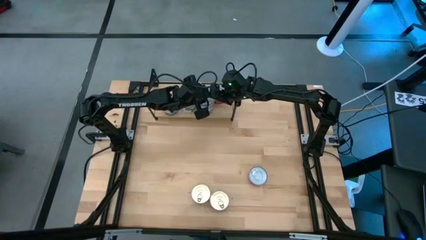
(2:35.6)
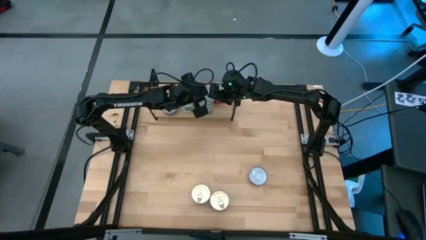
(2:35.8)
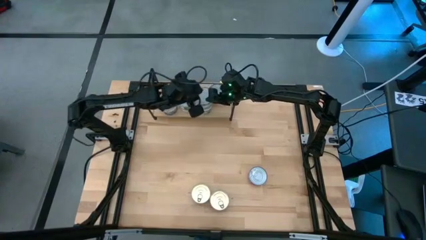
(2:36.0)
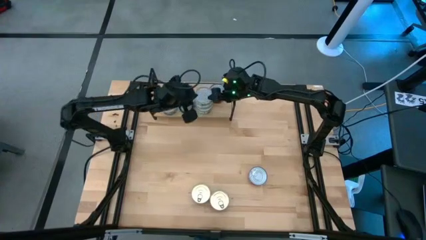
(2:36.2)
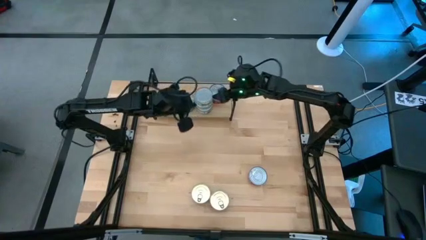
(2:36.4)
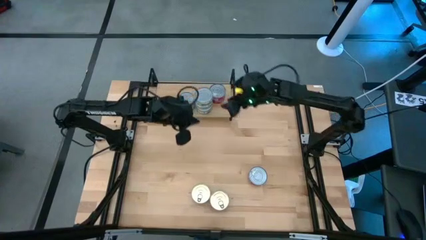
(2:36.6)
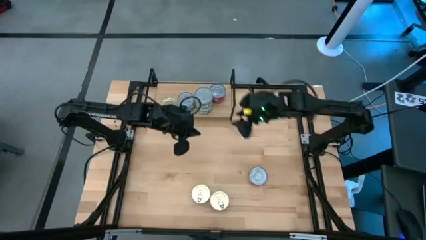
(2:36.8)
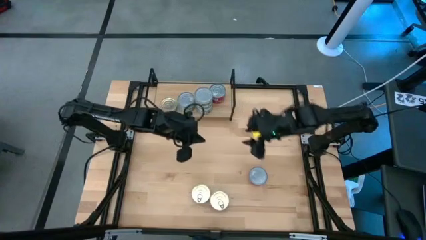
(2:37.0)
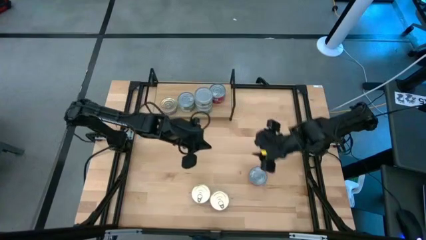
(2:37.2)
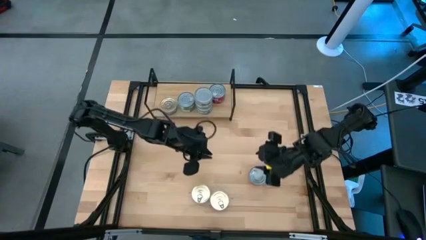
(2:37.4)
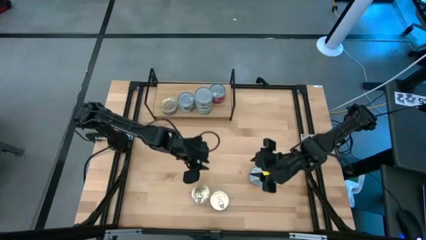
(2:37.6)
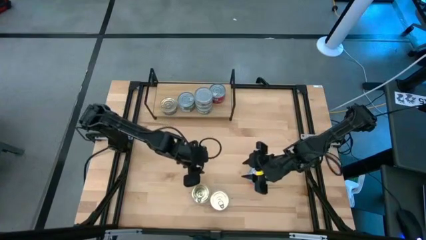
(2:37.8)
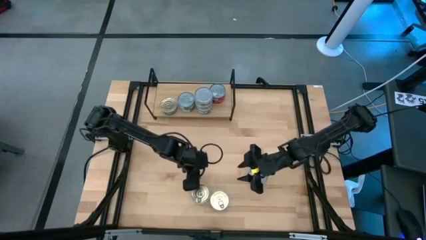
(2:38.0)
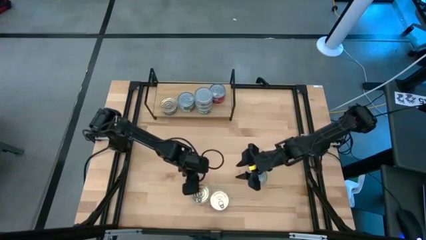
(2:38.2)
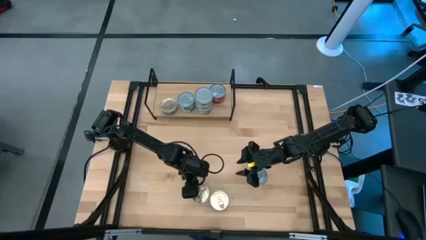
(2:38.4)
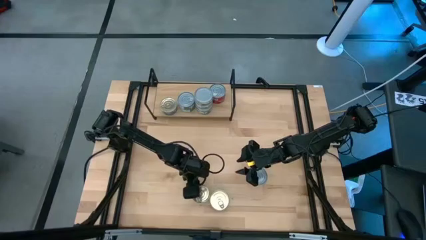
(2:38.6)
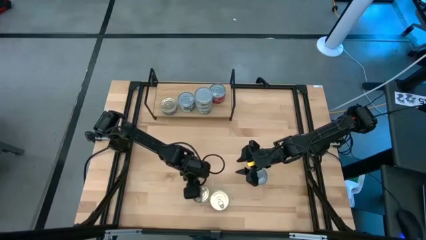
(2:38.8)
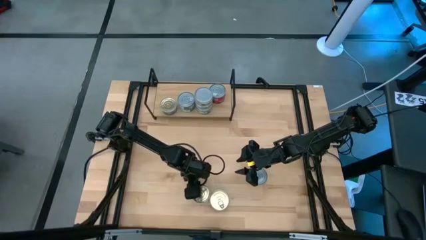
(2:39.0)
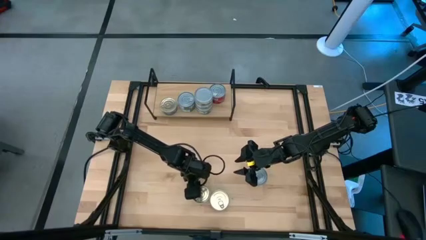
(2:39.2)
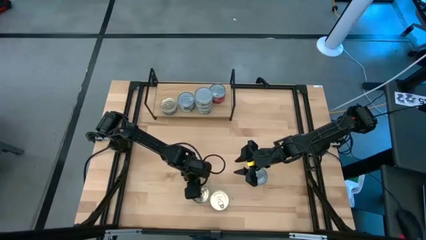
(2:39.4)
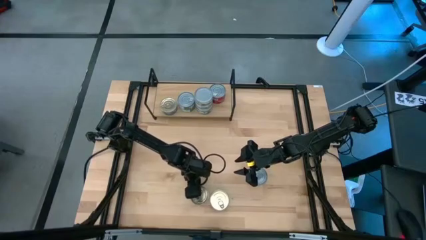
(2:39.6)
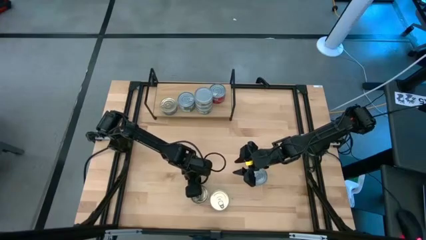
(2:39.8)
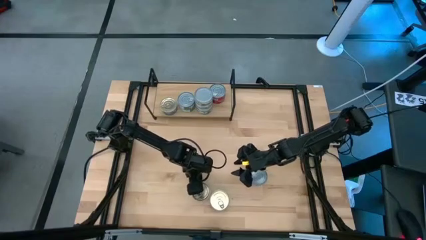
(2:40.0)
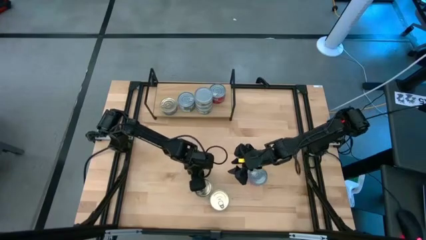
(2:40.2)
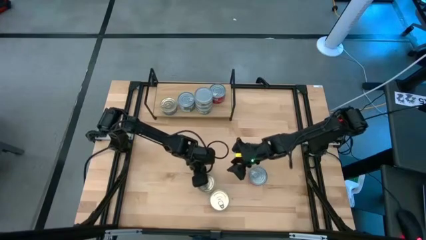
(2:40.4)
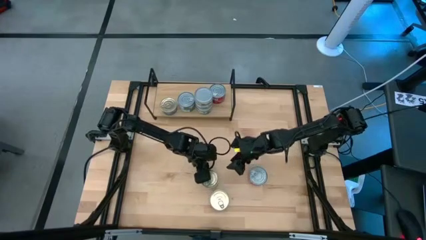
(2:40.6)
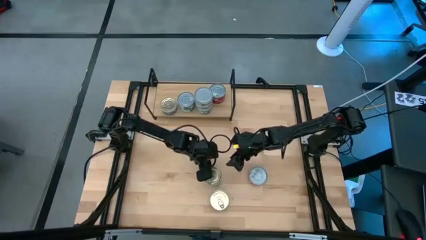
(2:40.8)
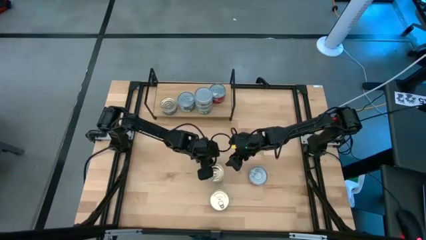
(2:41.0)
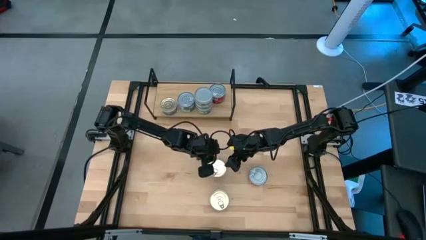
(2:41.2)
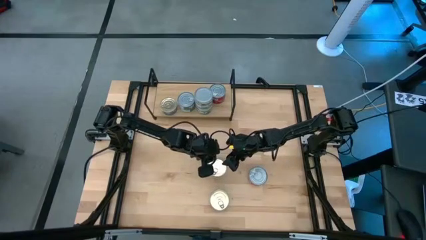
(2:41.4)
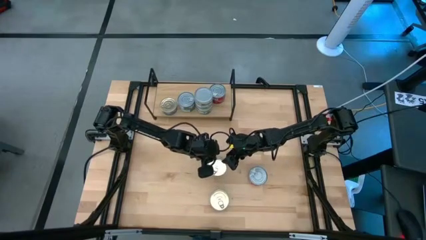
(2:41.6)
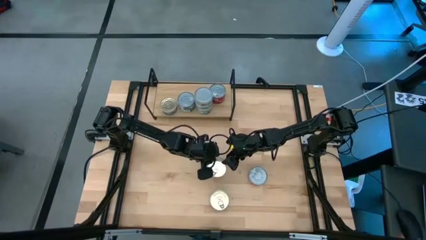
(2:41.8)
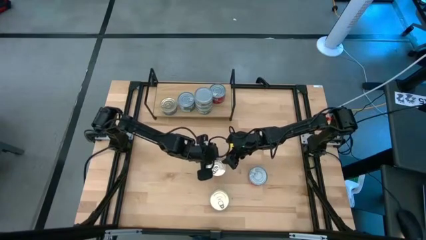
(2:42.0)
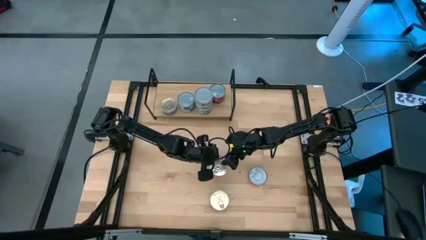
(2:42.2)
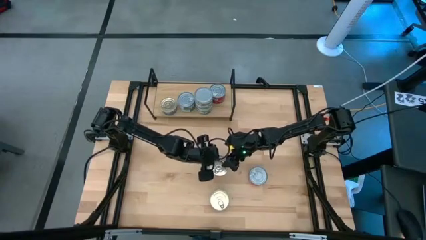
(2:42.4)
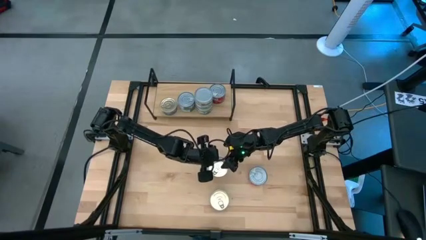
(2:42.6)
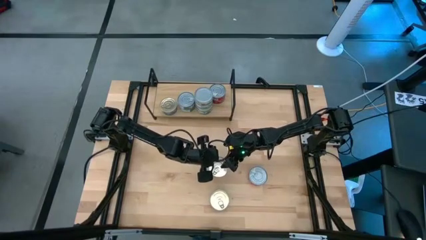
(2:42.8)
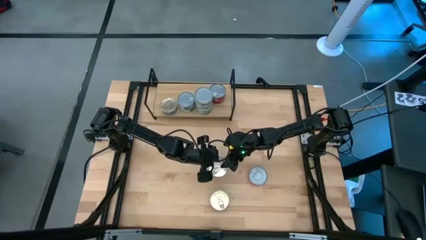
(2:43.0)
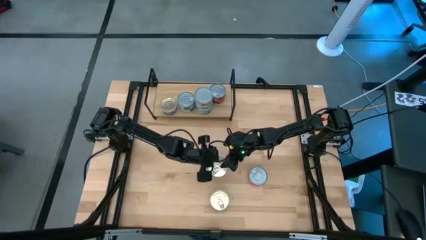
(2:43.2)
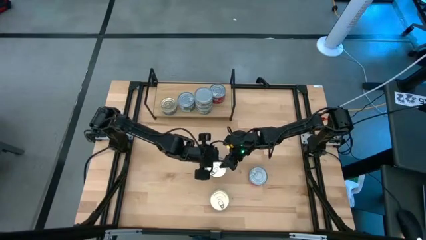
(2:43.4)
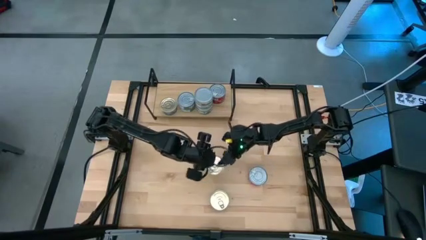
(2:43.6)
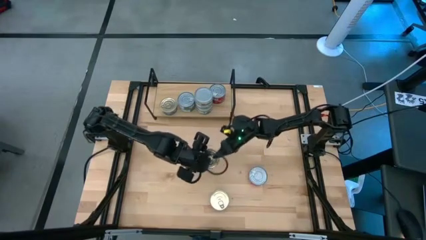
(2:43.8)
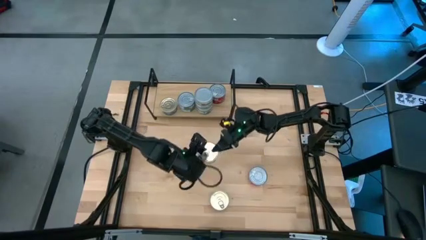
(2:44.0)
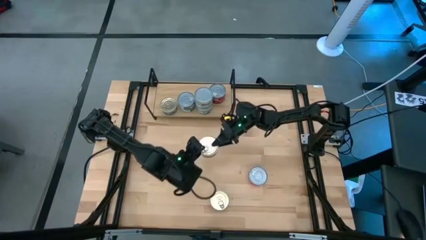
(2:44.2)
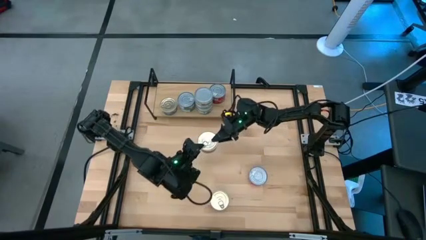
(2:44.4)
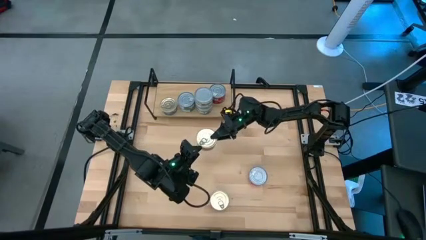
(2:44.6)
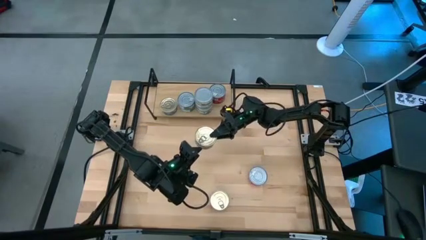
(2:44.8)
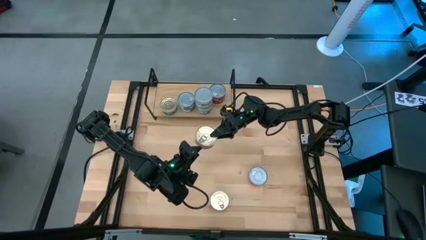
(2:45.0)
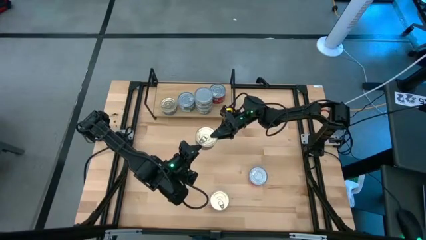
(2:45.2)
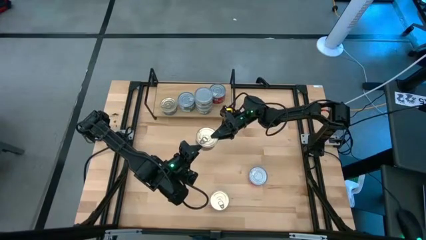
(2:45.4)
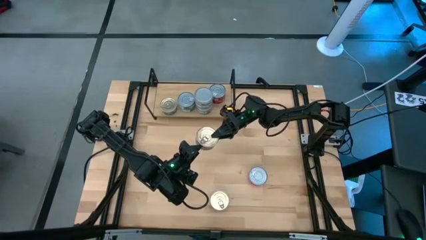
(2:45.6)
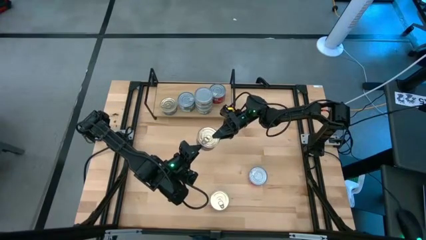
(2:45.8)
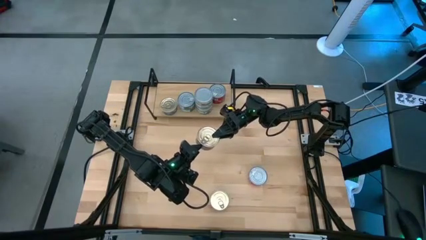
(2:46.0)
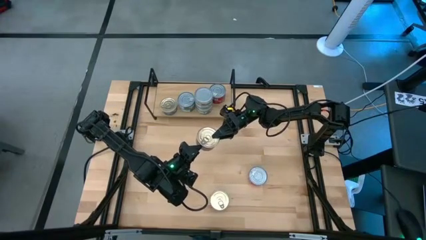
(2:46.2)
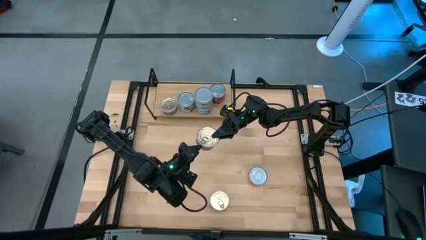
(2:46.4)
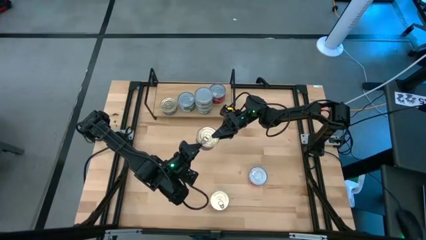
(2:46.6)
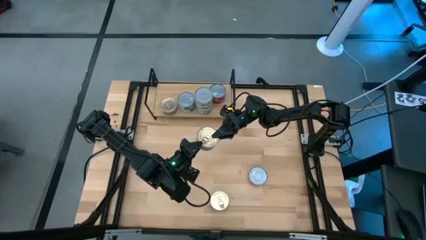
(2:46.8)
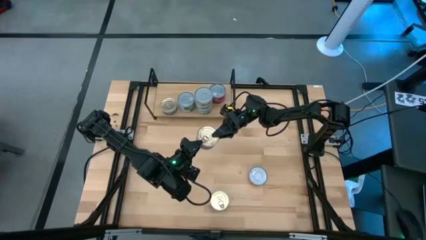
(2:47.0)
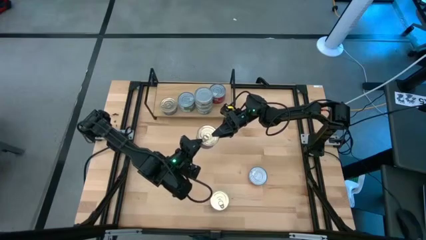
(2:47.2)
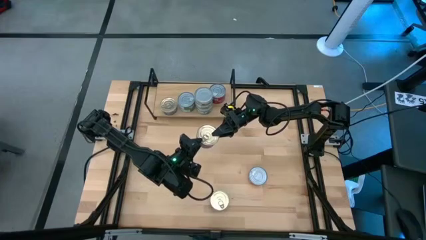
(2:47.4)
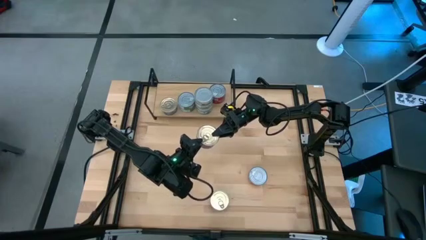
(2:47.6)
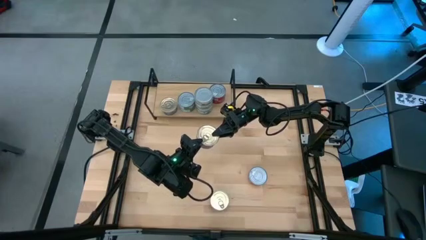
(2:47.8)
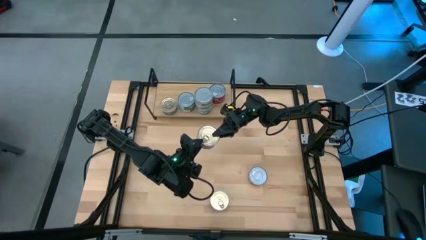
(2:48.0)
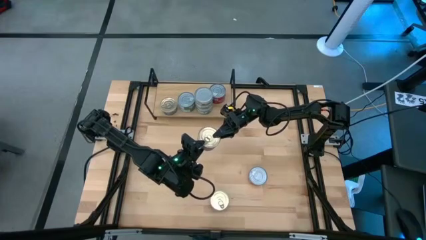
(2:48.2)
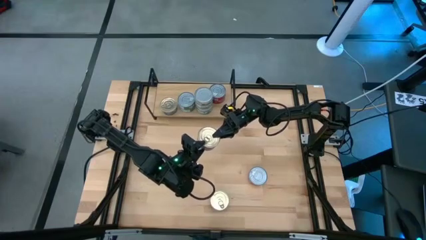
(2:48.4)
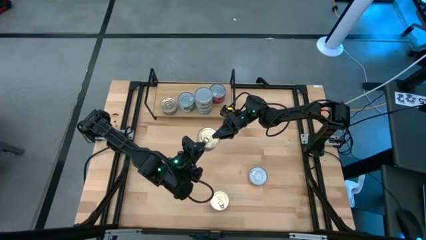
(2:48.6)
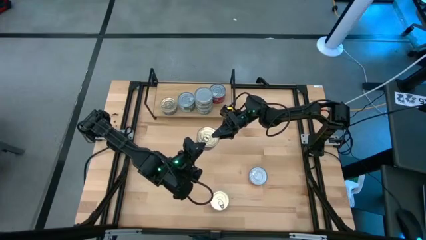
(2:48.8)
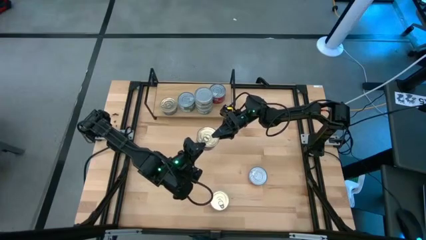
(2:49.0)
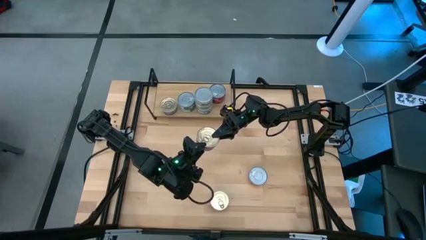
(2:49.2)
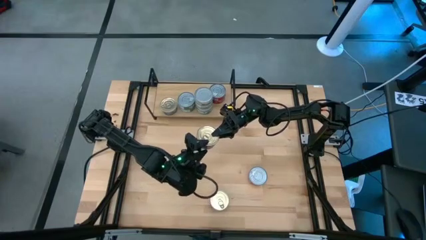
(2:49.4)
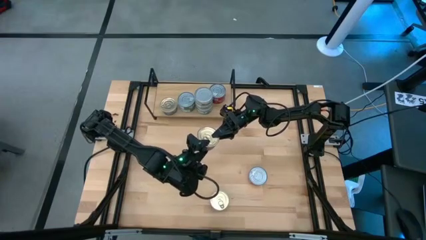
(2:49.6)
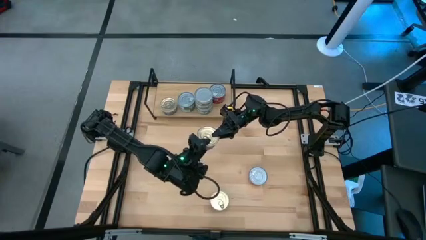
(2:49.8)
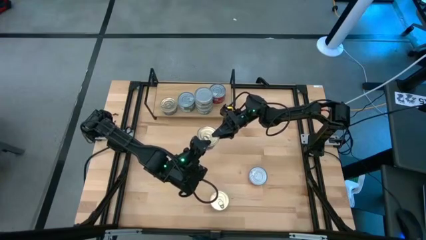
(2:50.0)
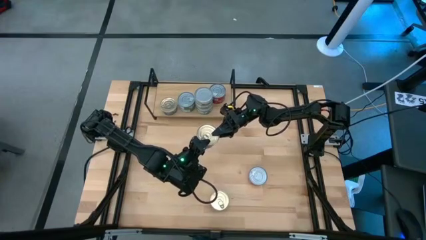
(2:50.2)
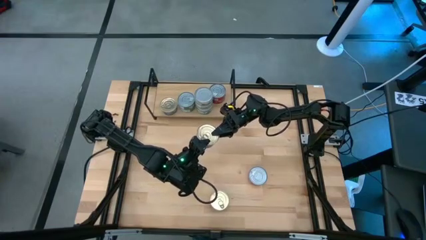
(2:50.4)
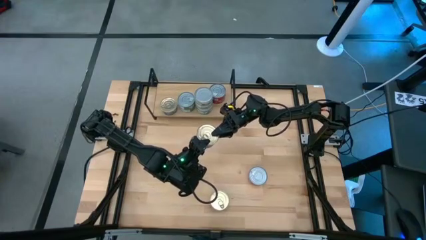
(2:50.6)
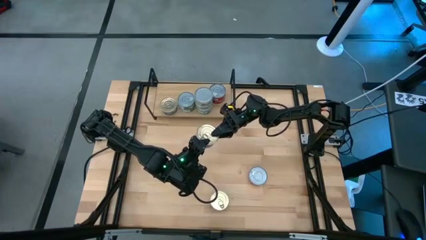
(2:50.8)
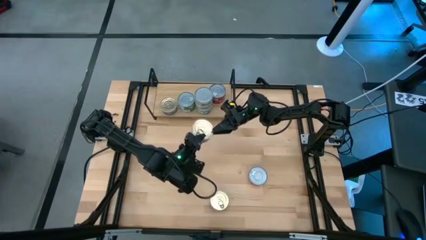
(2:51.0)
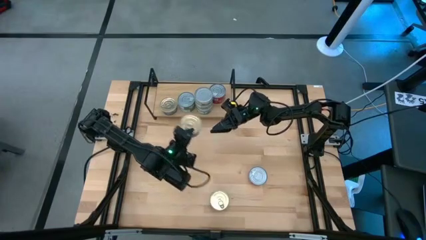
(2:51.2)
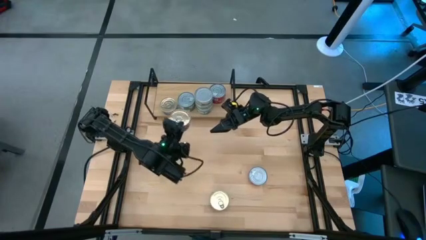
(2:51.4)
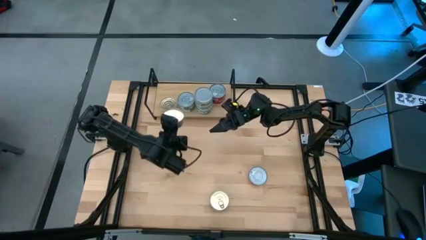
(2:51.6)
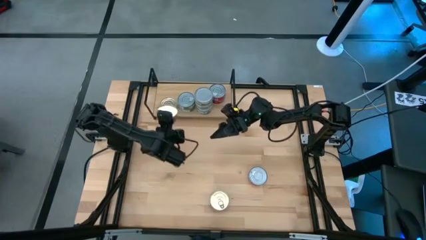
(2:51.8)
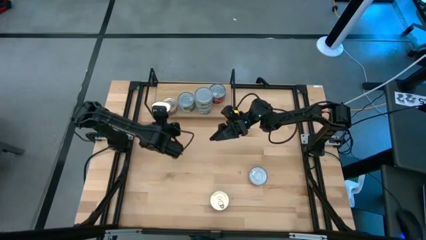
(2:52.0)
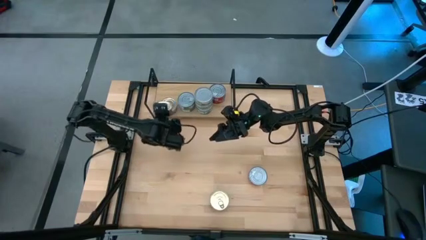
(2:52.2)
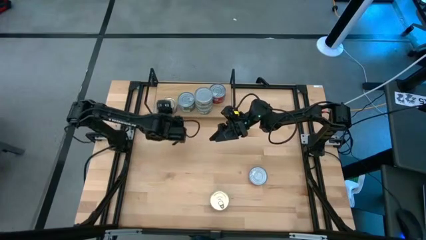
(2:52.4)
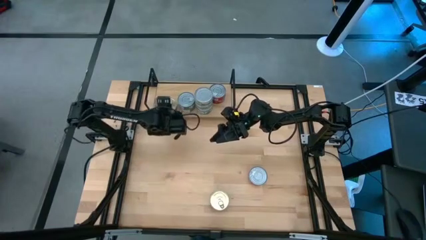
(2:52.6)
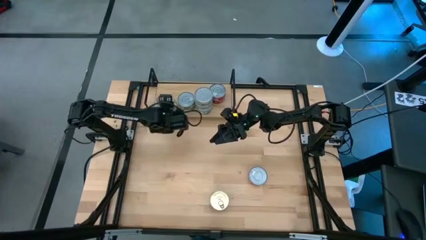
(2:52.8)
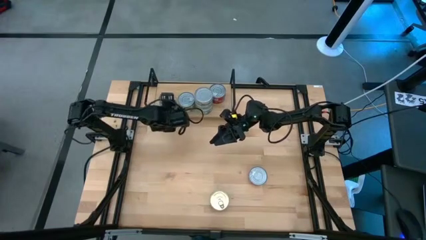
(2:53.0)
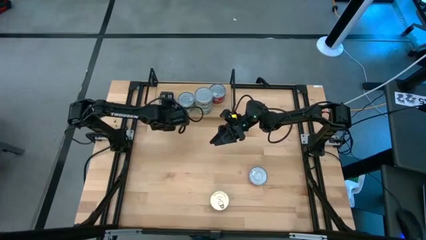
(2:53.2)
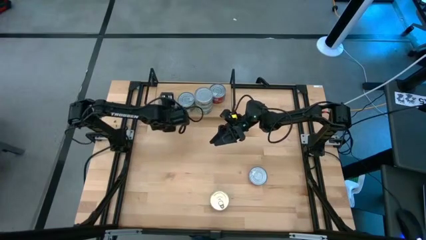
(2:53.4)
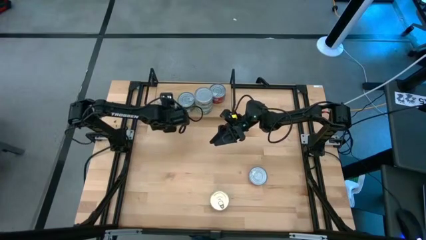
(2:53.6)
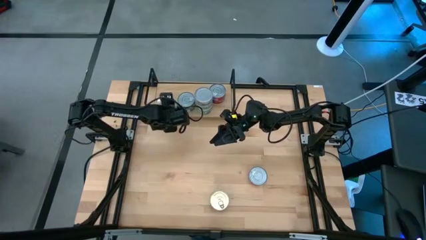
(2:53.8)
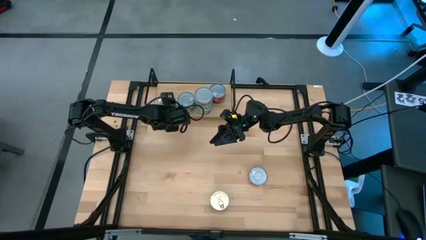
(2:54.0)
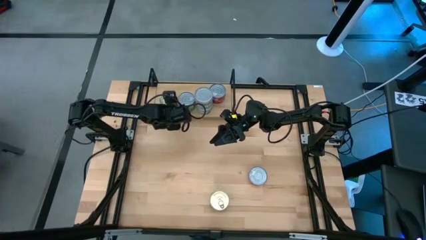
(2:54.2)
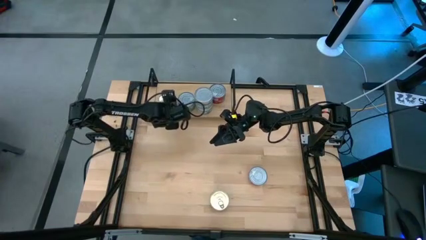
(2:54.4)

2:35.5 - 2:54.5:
Task: Stack canned seafood by type on shelf
Stack the blue tuna can on top of the other blue tuna can on the shelf
